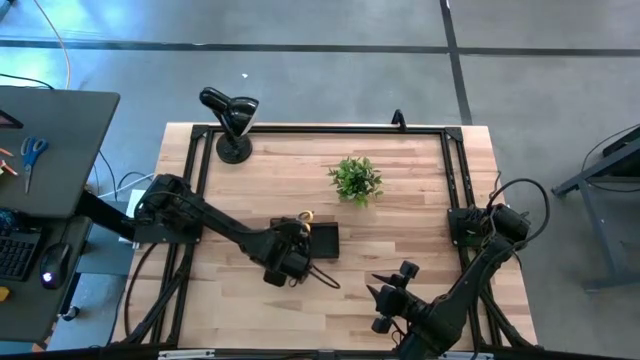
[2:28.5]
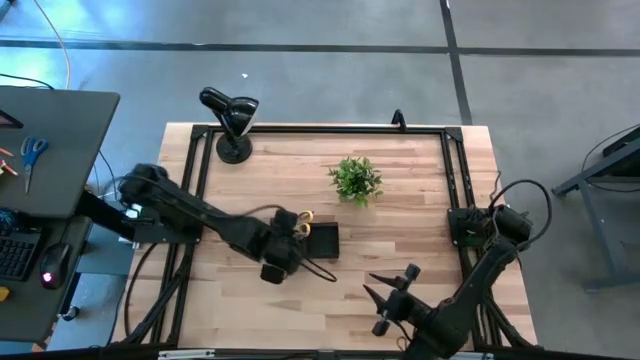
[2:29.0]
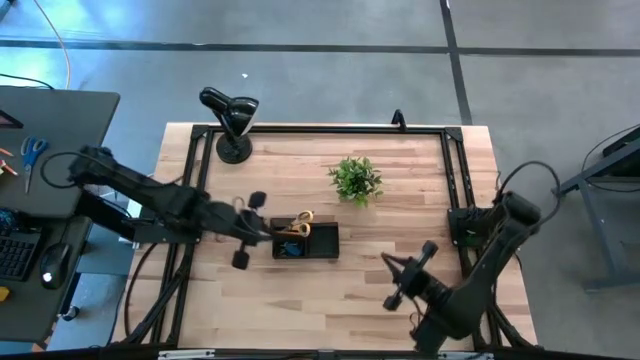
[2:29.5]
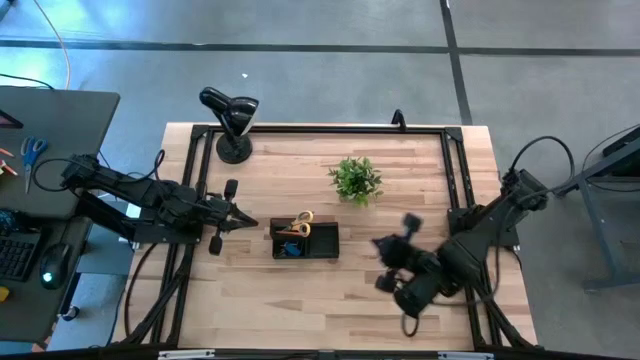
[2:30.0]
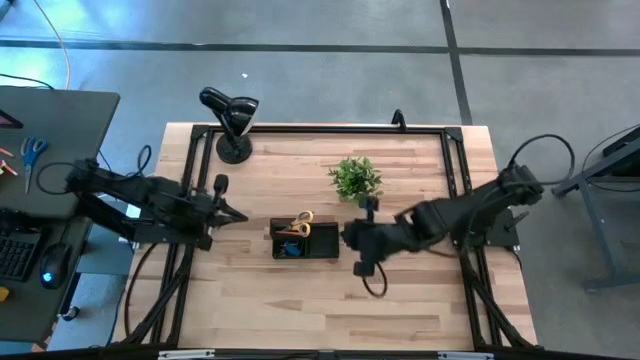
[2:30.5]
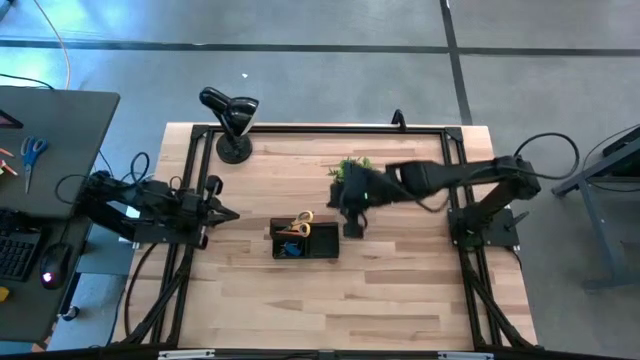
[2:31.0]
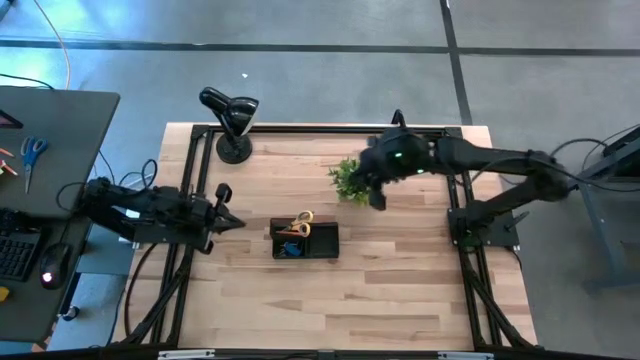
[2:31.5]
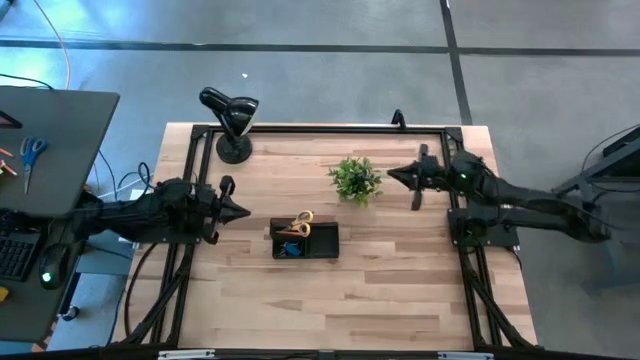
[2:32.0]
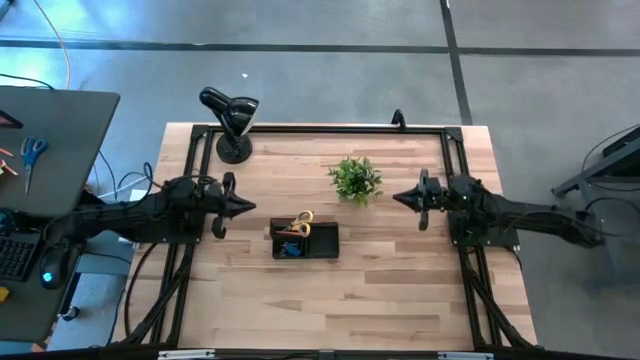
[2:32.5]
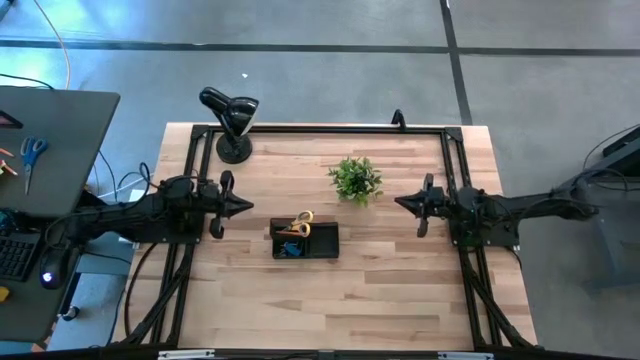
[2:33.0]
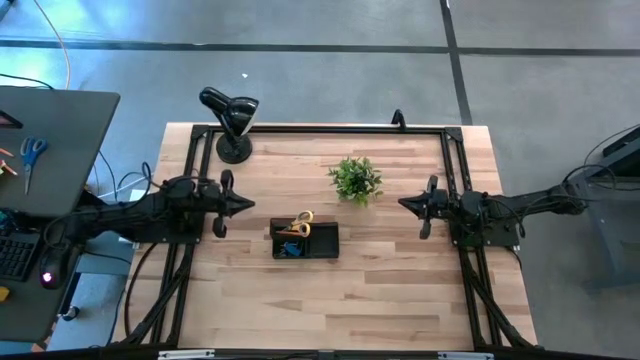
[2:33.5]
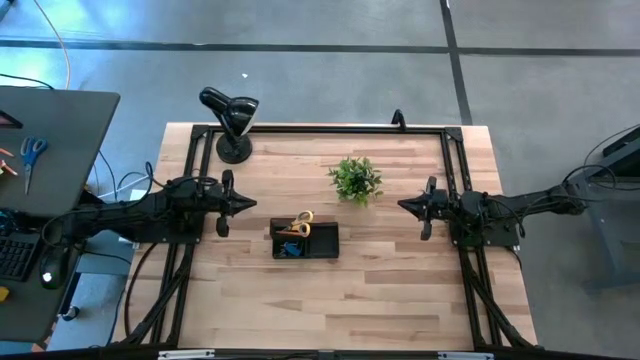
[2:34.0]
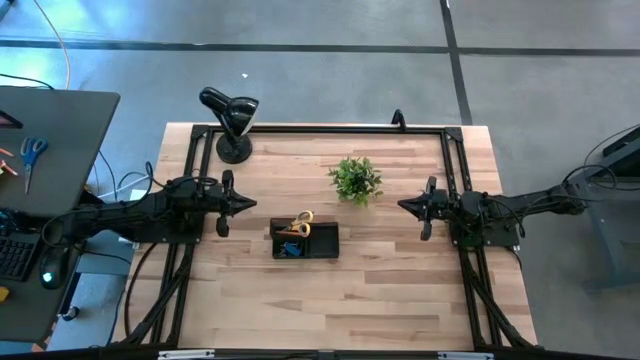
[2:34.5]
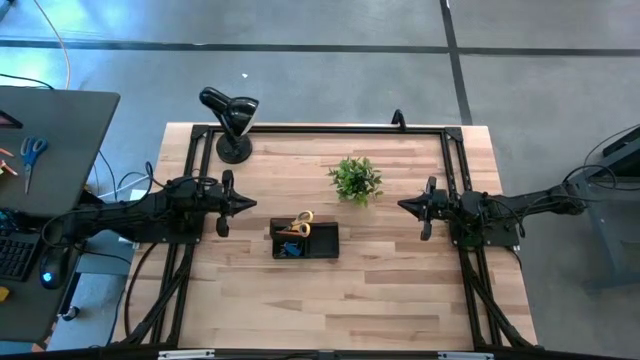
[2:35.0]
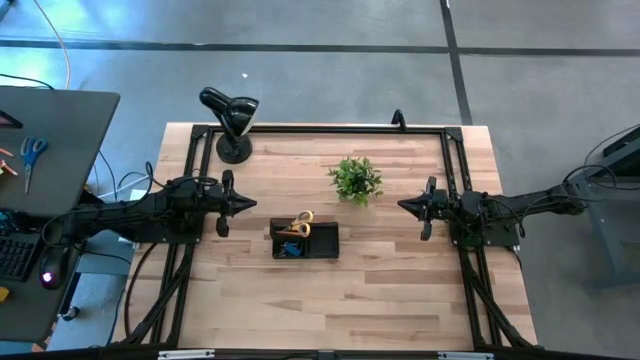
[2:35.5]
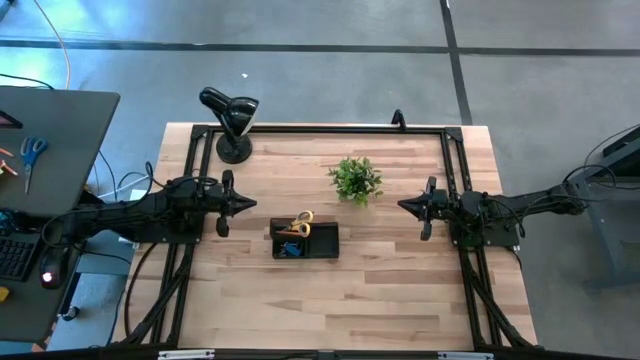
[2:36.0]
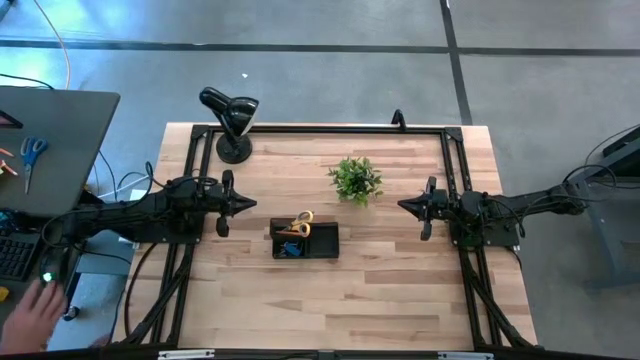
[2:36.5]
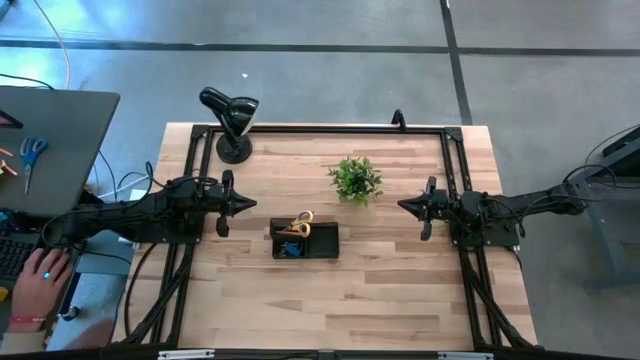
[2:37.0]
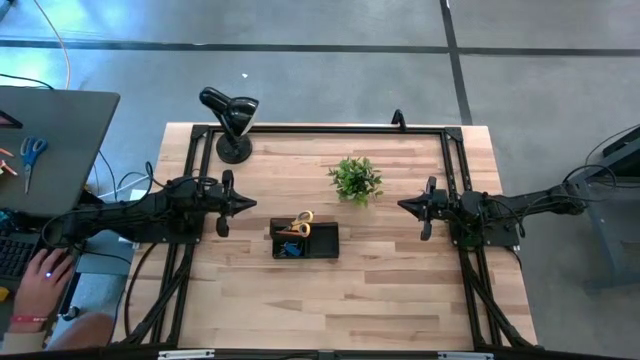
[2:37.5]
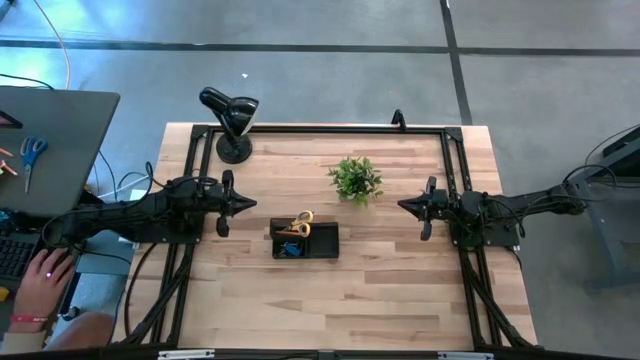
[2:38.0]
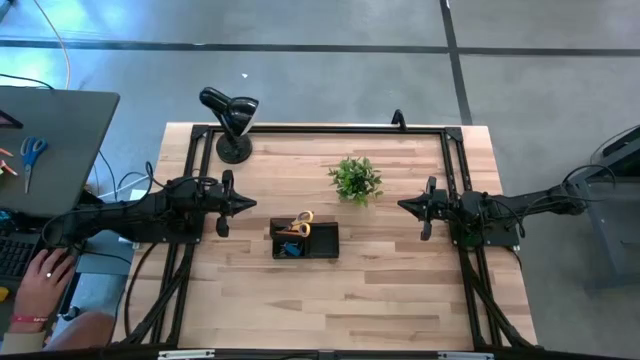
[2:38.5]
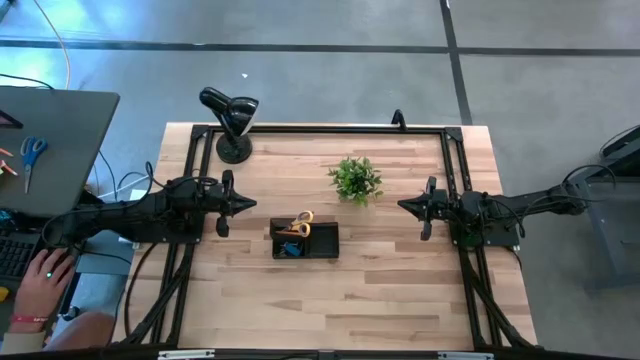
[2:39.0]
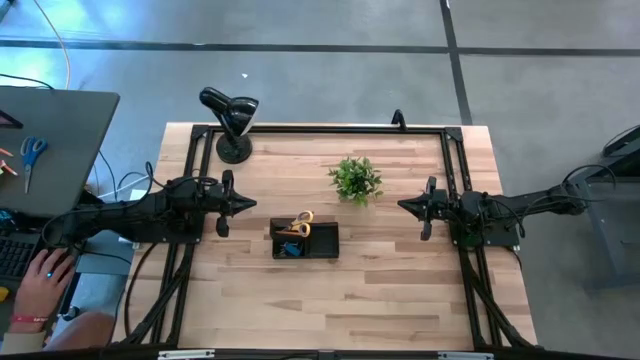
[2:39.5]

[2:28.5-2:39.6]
Task: Pick and place office supplies into organizer
Return to Home Position

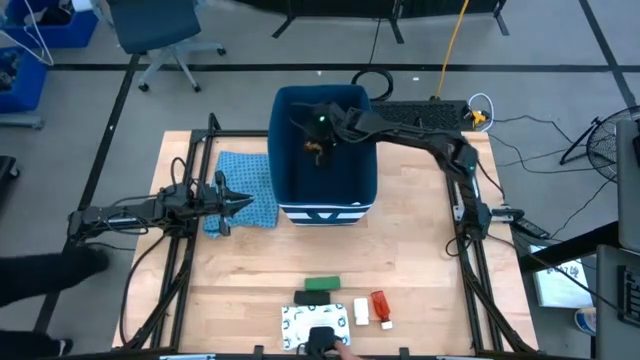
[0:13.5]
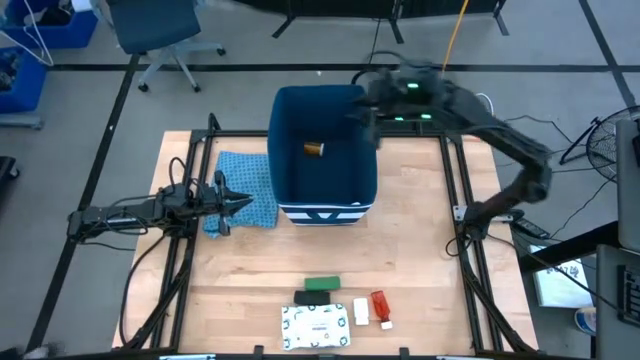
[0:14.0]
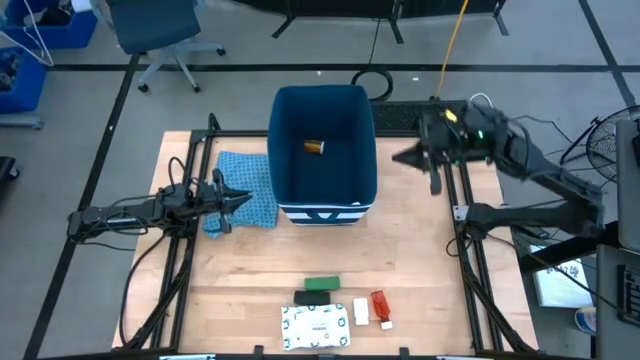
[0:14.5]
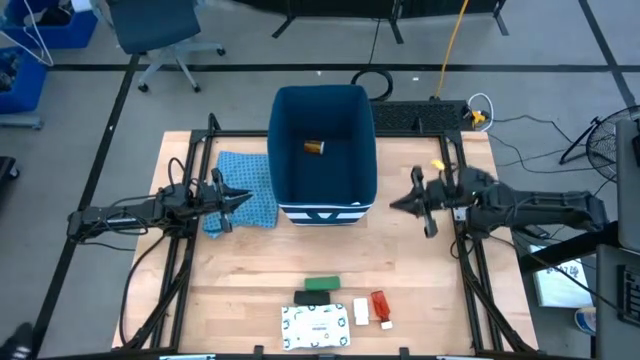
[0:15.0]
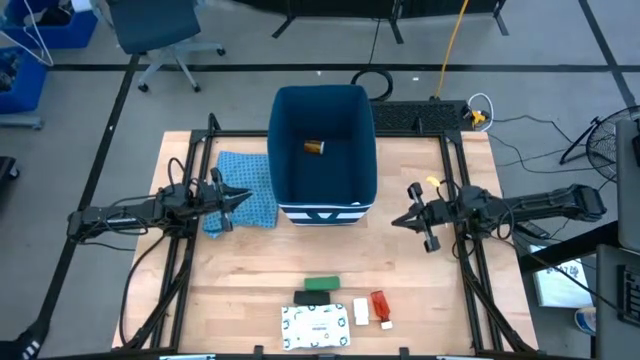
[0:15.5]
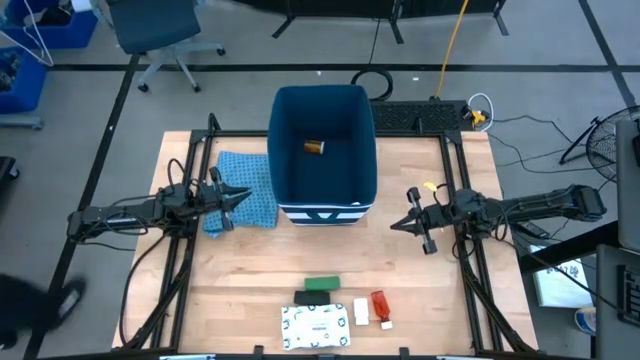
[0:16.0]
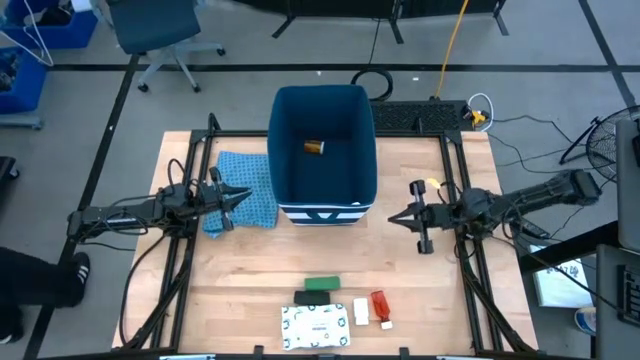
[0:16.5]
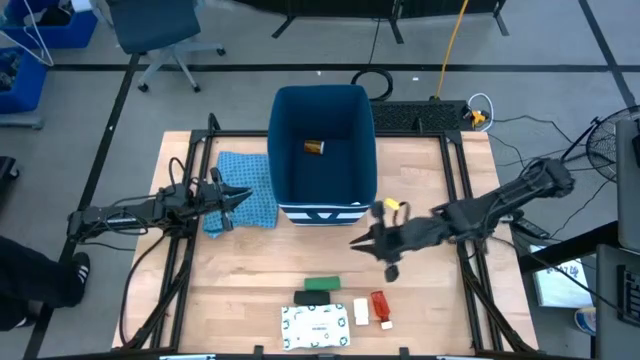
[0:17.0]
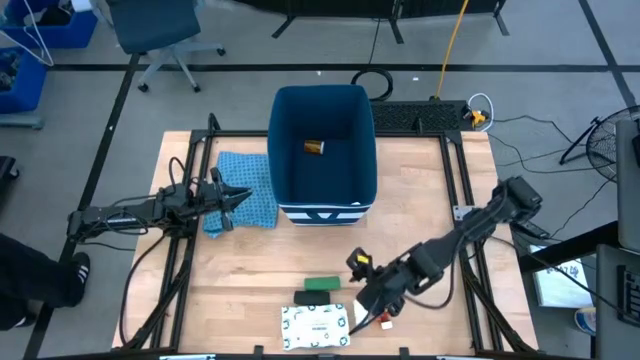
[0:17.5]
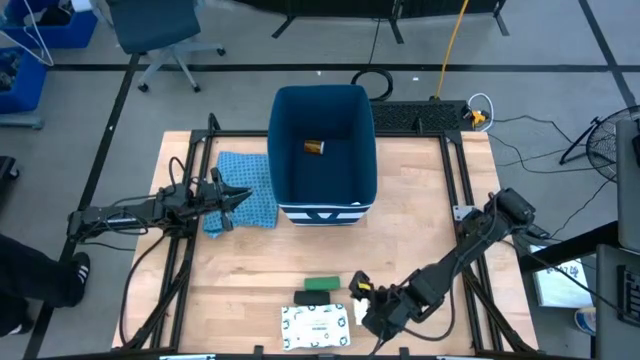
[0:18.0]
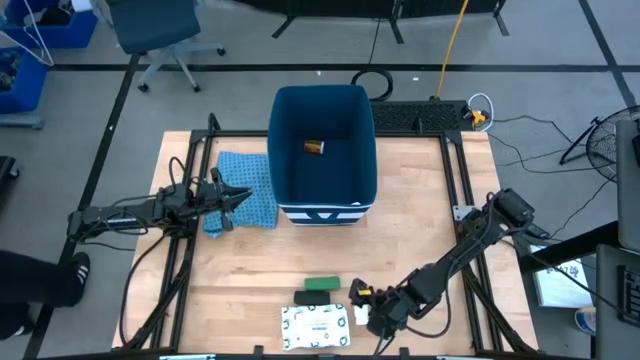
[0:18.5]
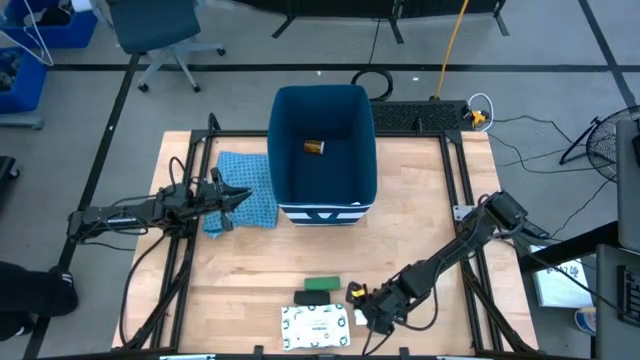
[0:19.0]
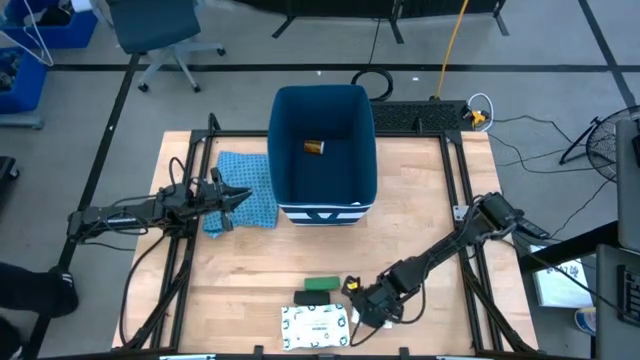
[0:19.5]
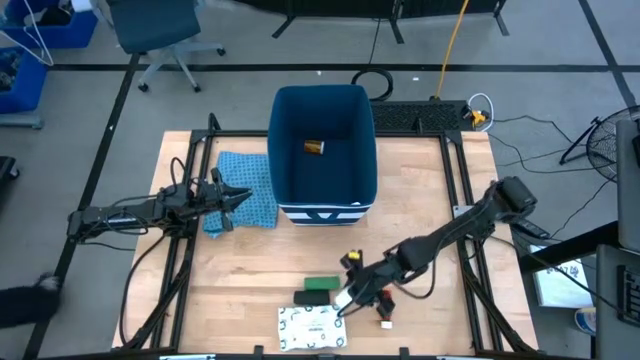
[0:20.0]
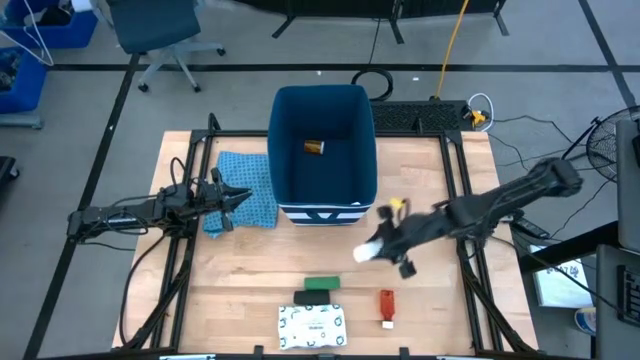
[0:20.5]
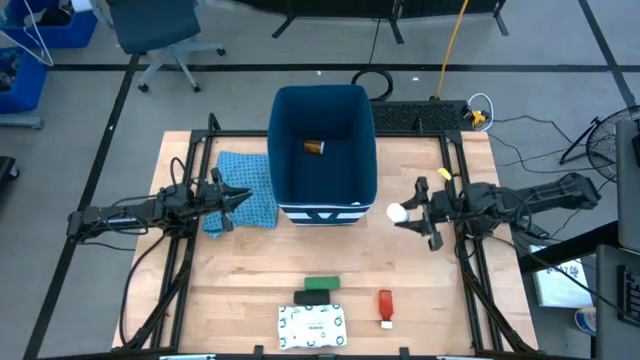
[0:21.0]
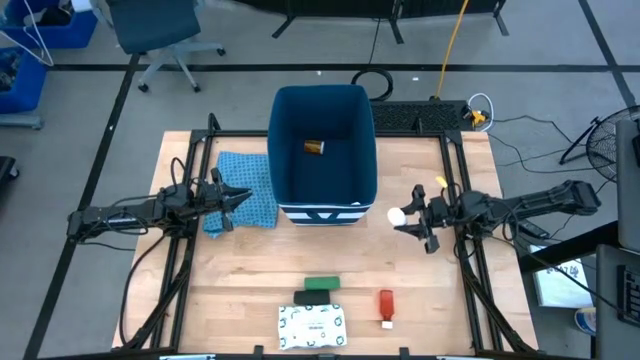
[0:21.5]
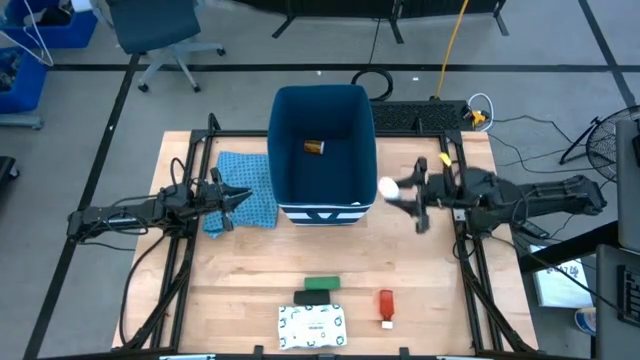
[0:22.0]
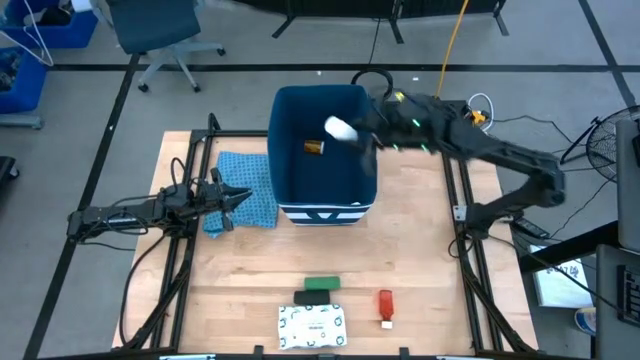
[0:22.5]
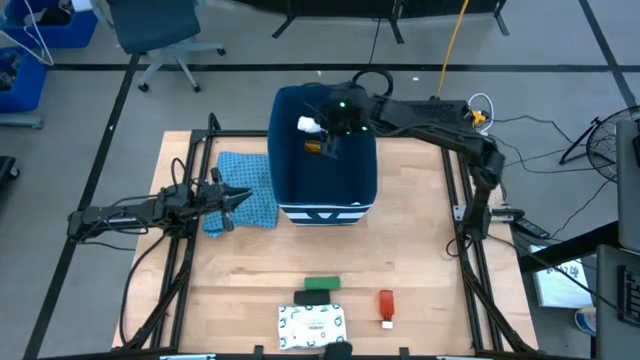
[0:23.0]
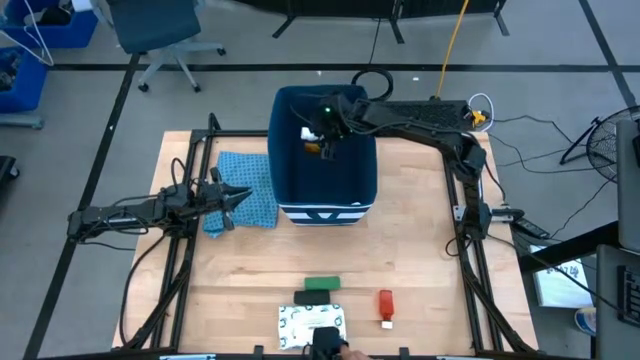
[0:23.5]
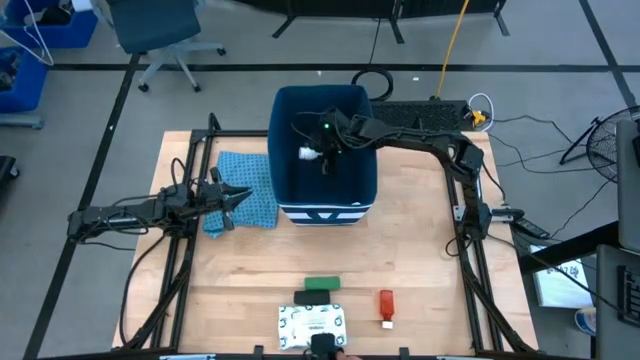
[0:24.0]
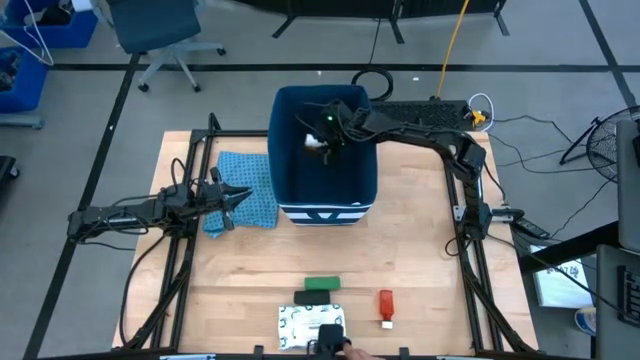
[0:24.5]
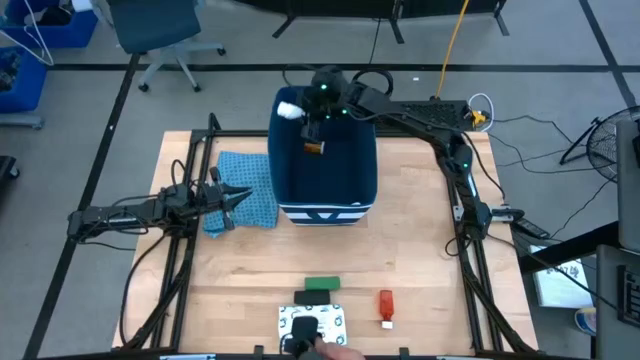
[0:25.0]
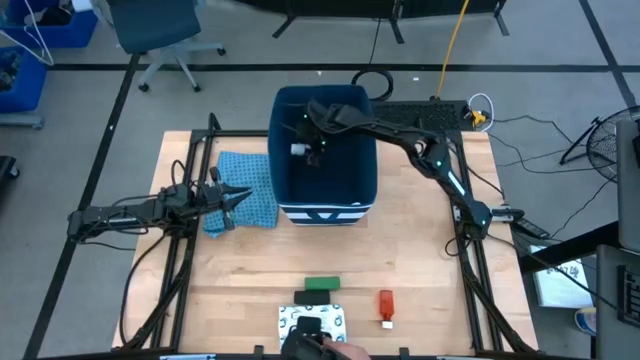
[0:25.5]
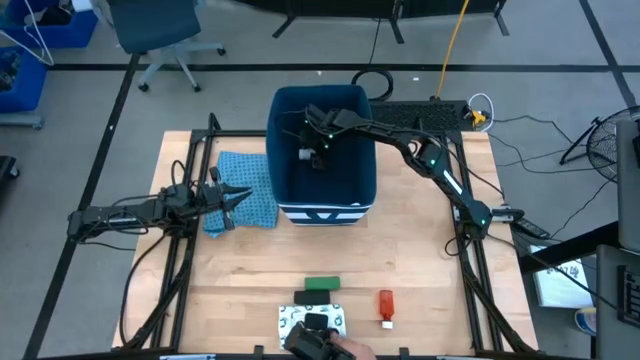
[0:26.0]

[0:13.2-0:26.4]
Task: Pick & place medical supplies in basket/bin
Put the white pill bottle into the blue bin
